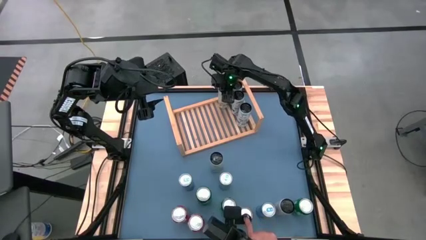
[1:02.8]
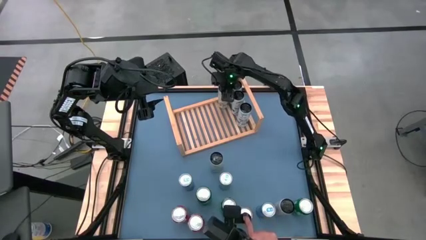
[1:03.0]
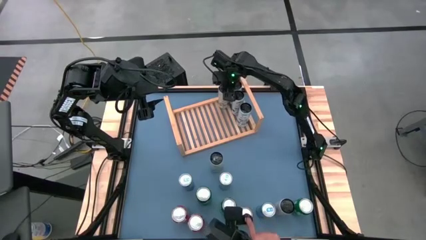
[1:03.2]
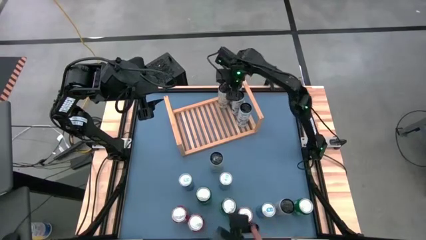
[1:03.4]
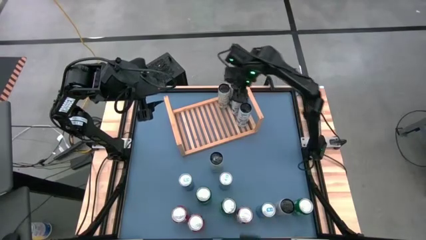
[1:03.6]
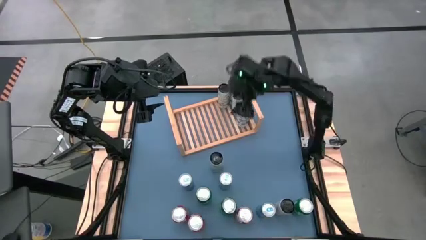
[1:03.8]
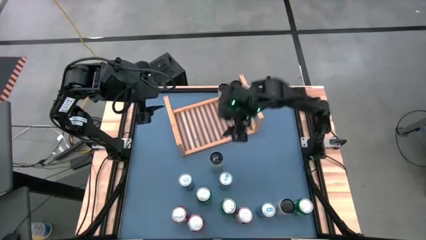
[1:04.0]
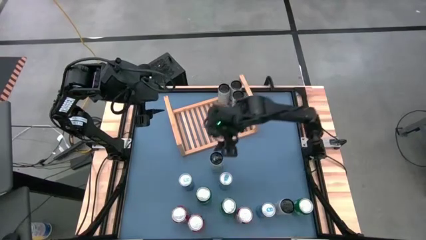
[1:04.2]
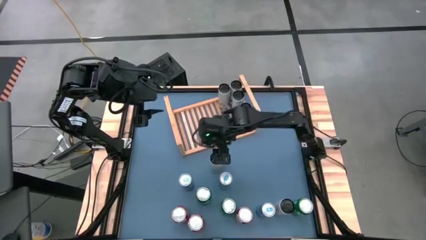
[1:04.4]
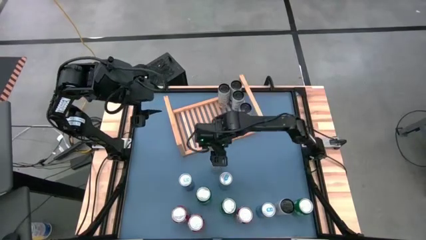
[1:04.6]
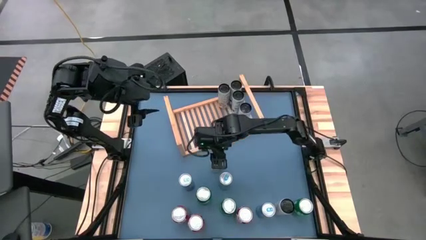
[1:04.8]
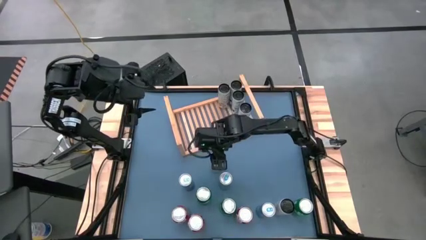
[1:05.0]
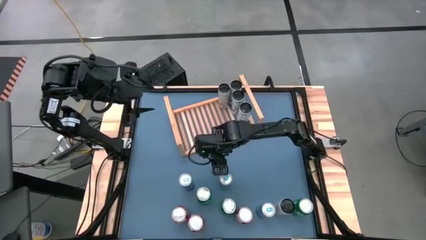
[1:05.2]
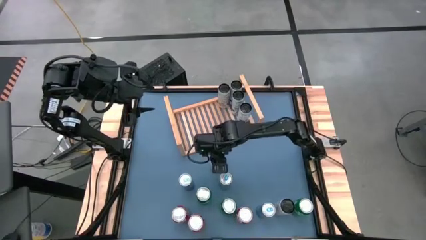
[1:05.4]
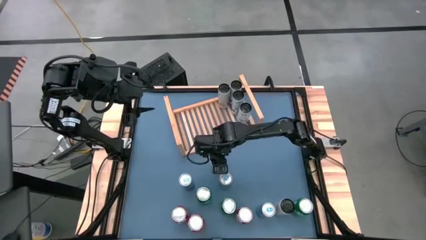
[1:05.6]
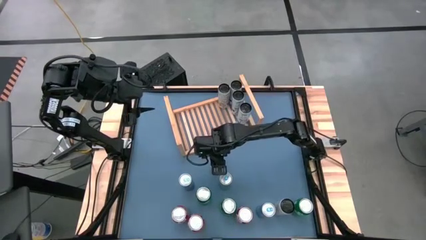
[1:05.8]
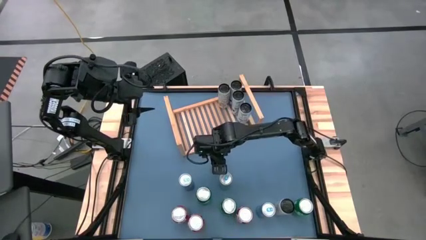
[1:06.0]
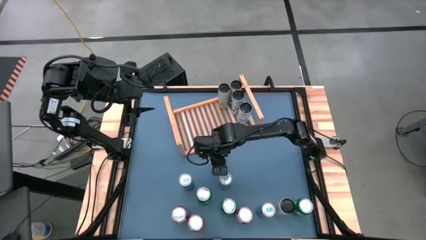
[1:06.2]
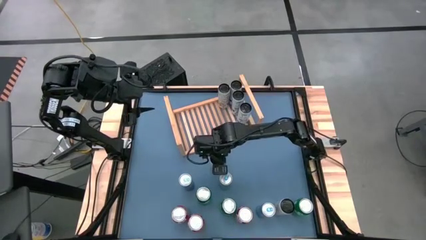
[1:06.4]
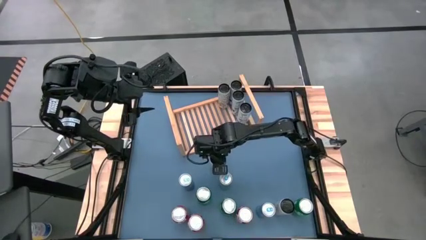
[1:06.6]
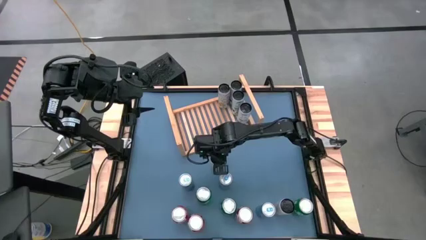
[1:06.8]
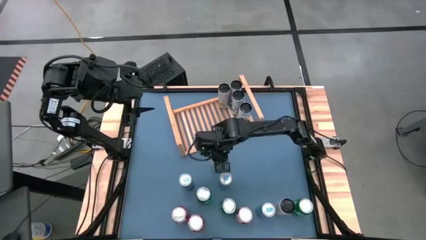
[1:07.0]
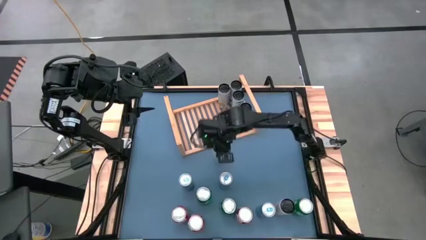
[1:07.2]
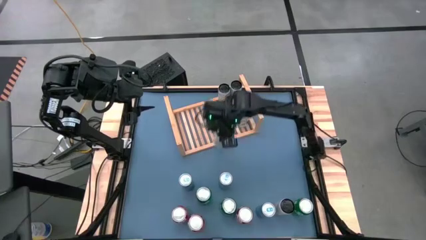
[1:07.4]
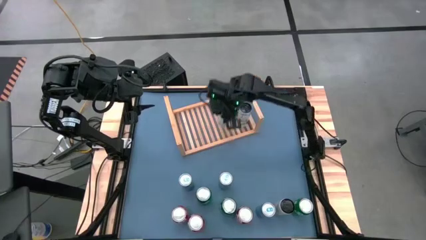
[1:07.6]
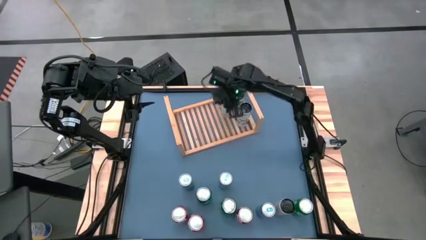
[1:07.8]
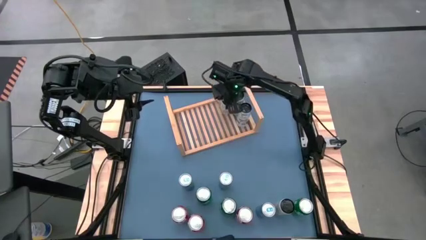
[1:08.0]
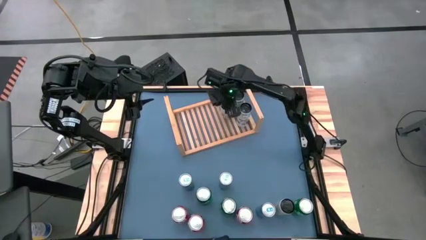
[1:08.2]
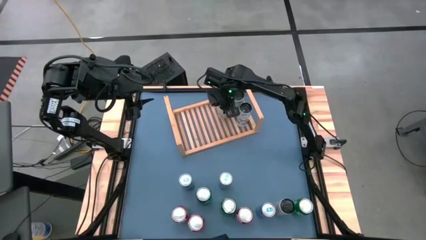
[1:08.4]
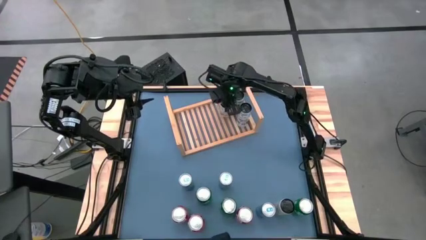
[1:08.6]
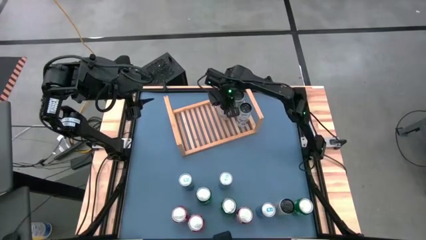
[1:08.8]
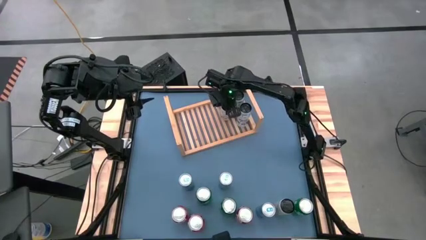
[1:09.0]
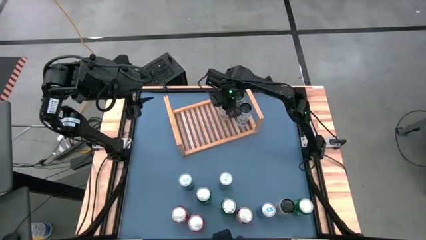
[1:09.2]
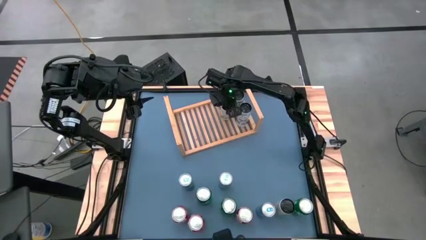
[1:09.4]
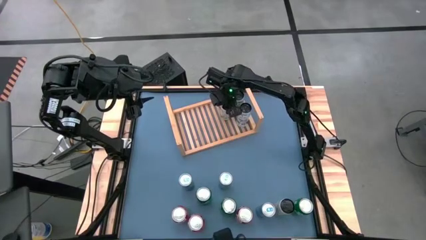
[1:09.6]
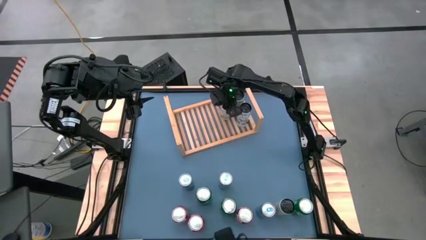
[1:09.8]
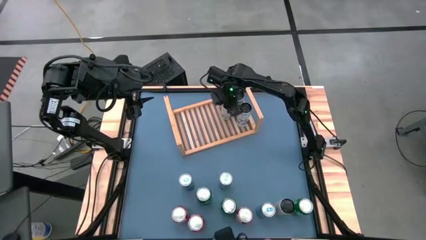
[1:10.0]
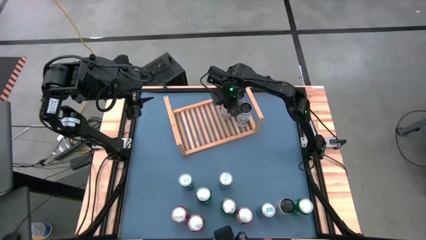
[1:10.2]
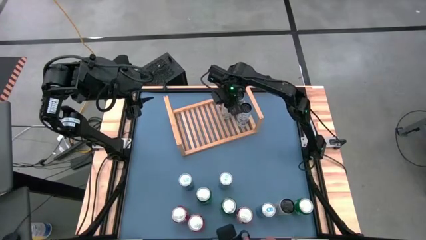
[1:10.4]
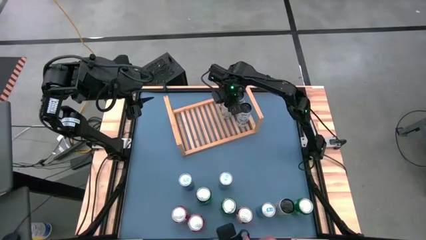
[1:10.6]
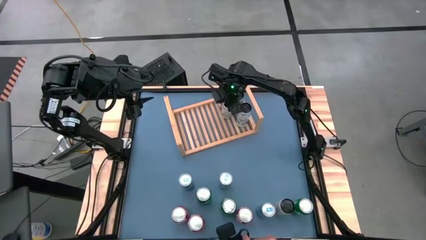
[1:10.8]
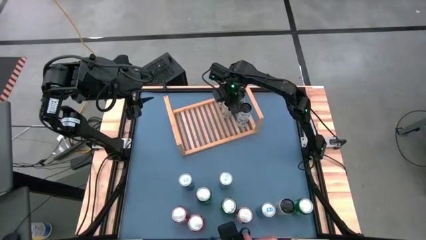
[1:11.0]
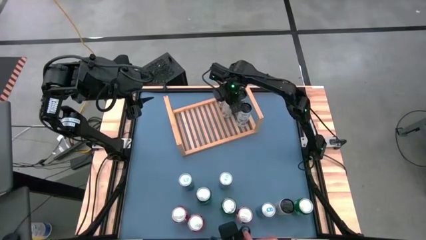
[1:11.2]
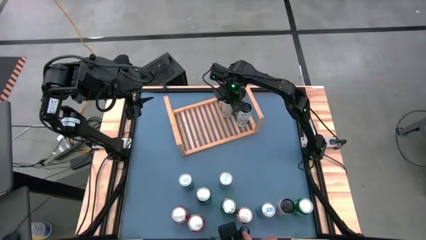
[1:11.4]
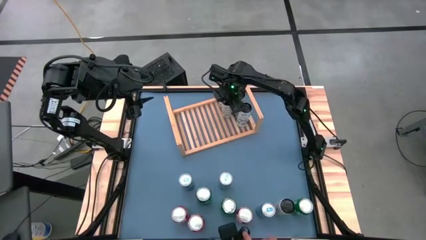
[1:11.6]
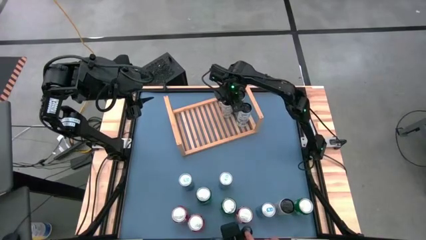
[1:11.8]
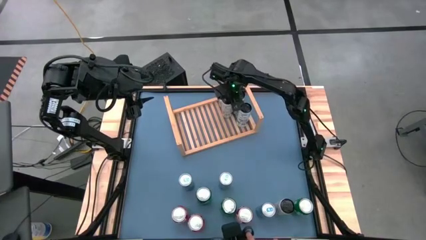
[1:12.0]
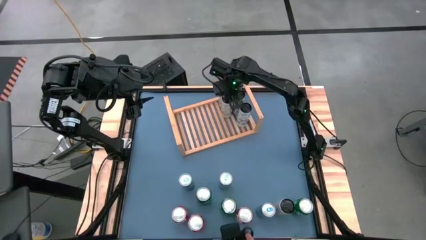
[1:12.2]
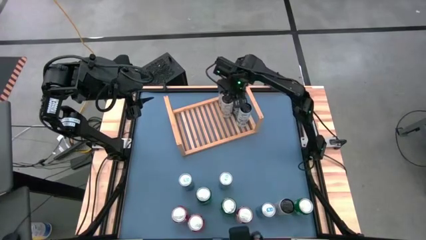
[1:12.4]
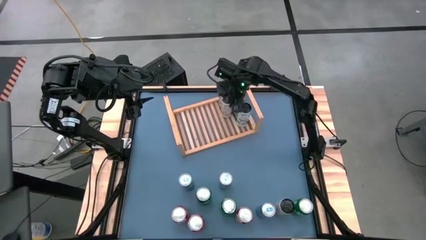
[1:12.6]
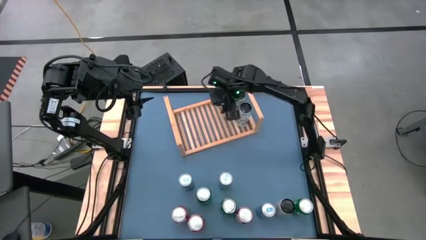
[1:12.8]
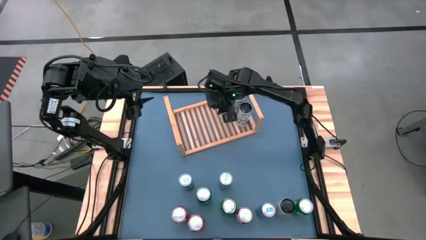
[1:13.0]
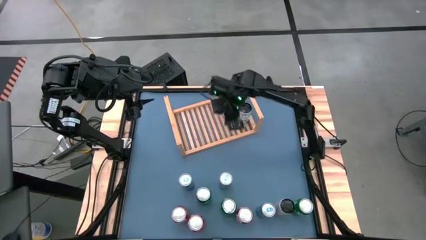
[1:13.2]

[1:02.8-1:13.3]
Task: Place canned beverage on shelf
Put the white-yellow soda can on the shelf aligned with the other white-yellow soda can
